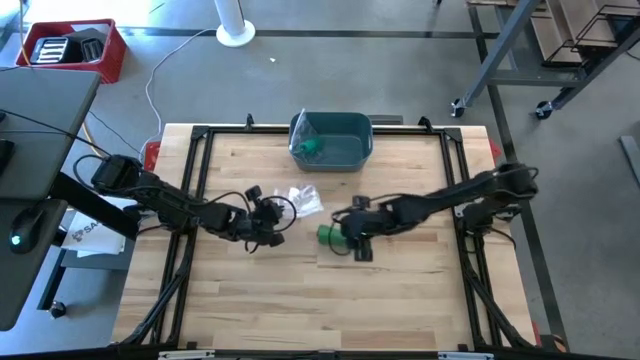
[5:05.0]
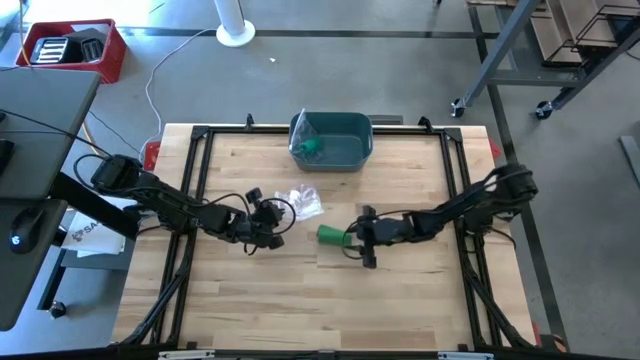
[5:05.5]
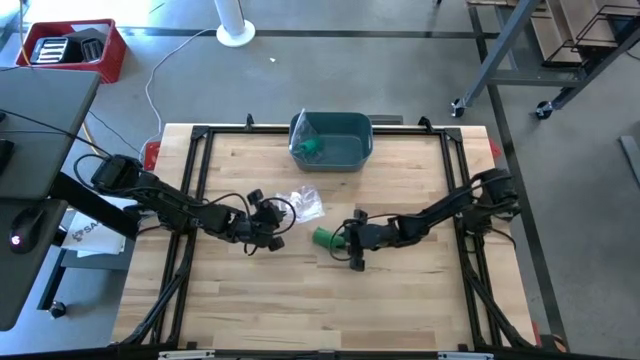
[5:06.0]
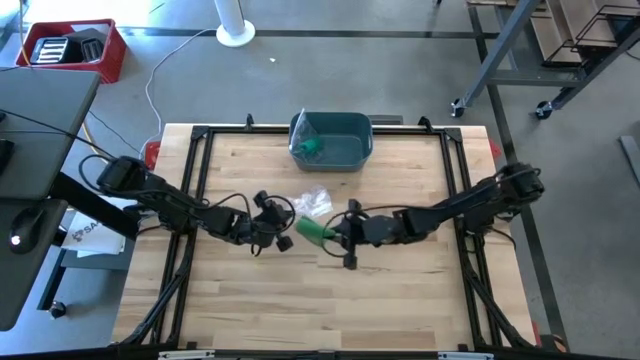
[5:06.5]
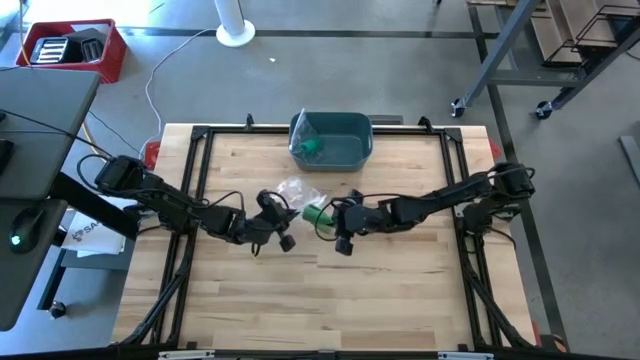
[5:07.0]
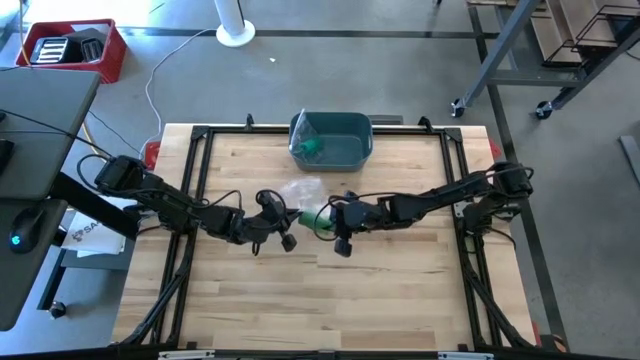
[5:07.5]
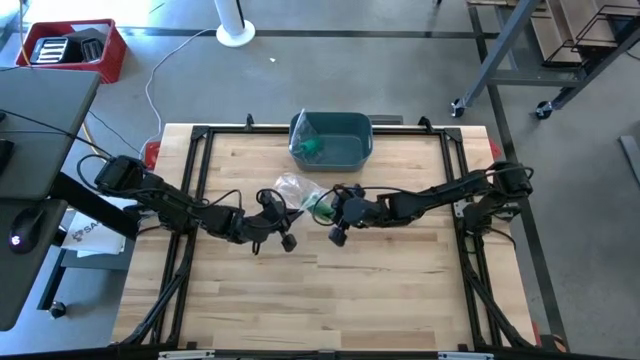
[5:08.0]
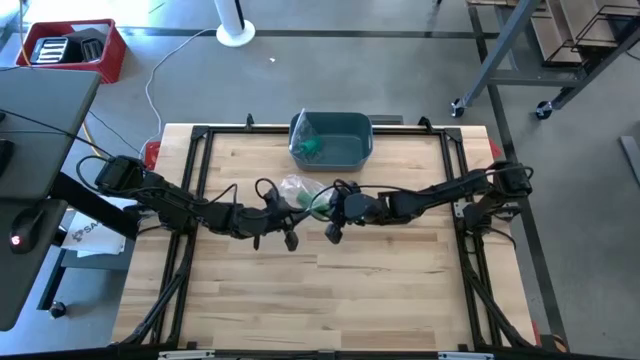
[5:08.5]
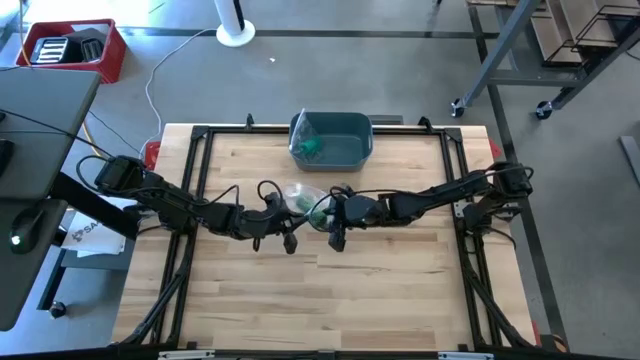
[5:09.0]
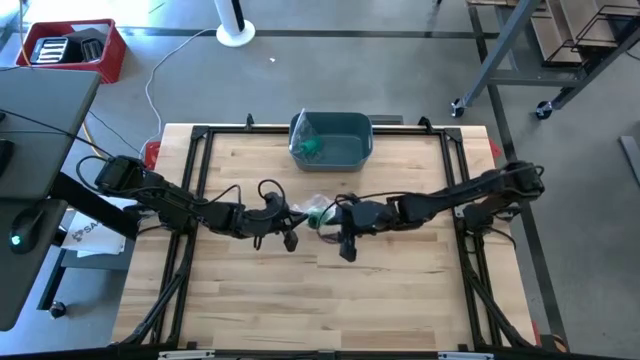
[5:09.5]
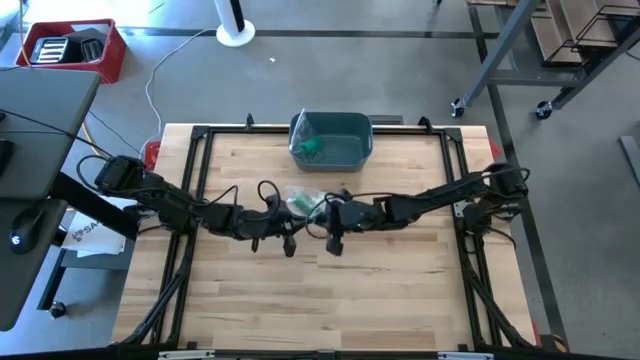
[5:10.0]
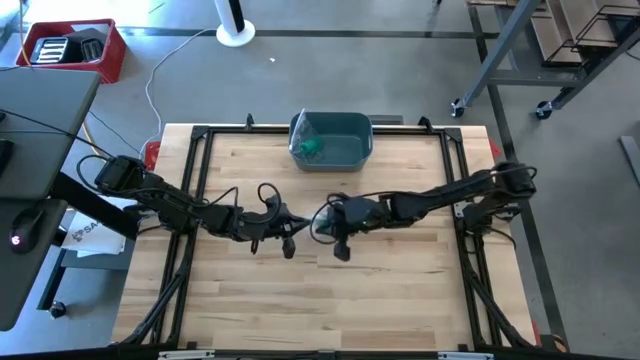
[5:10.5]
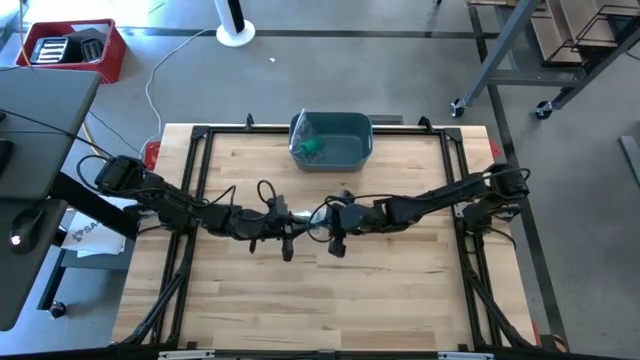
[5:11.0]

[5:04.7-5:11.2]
Task: Roll bandage
Put the green bandage into the transparent zip bag

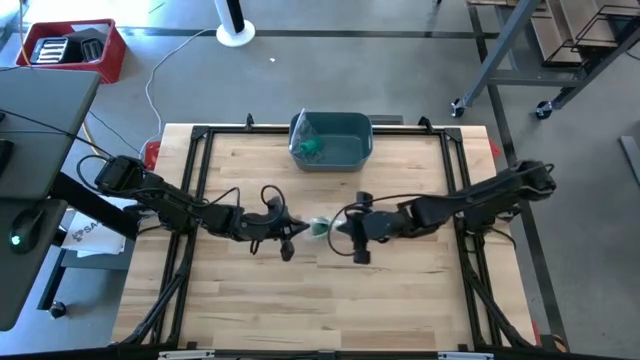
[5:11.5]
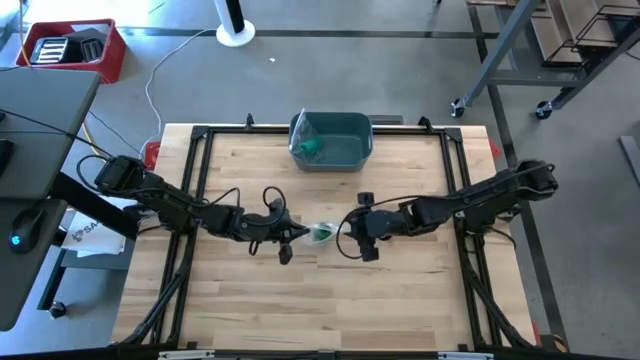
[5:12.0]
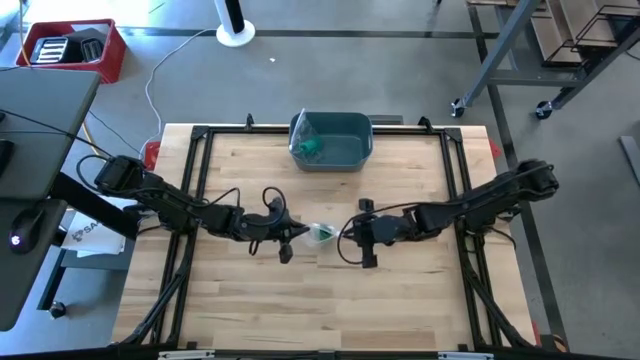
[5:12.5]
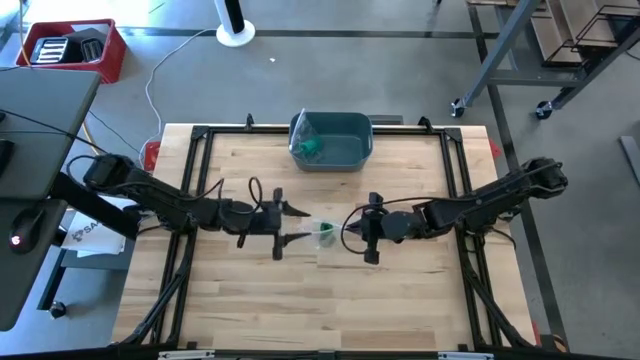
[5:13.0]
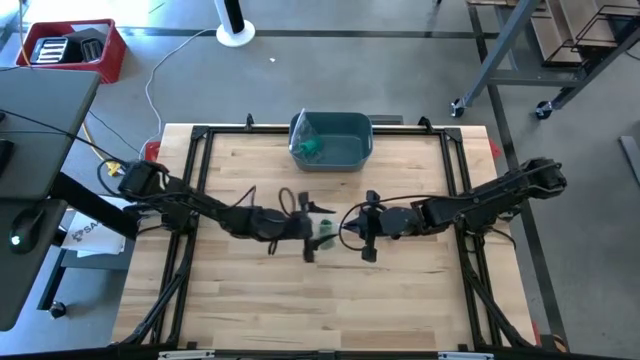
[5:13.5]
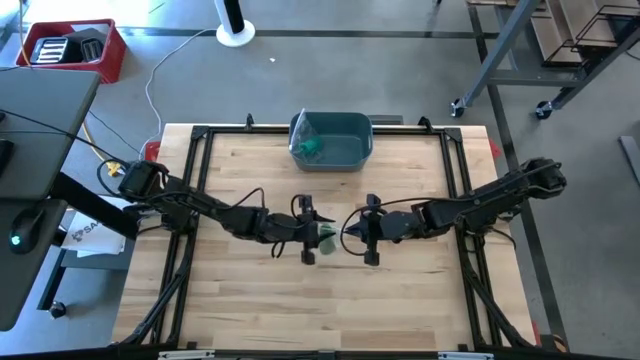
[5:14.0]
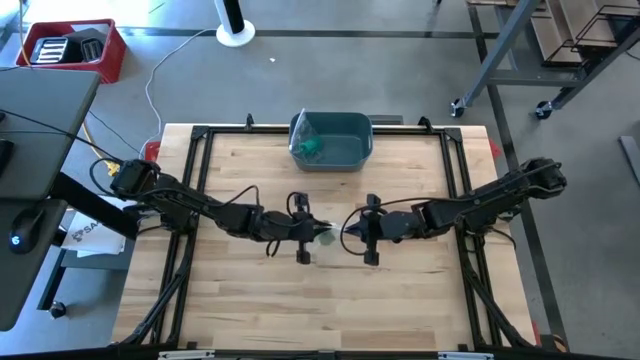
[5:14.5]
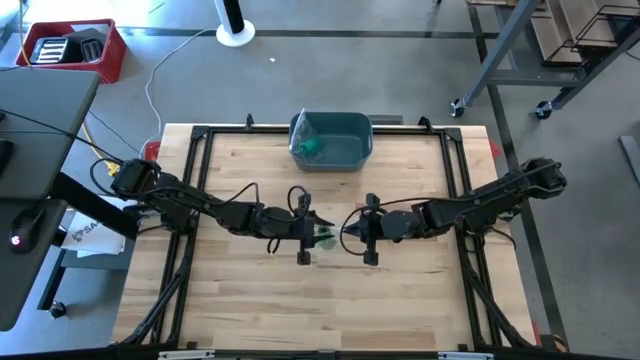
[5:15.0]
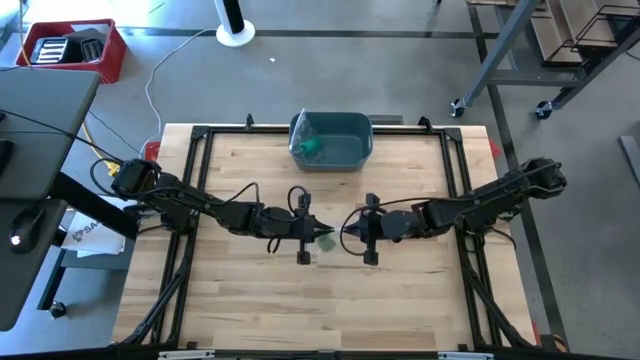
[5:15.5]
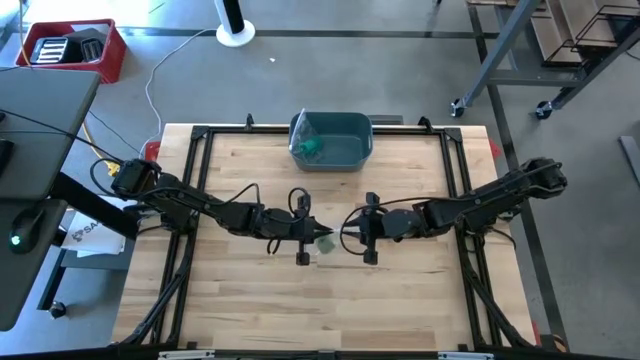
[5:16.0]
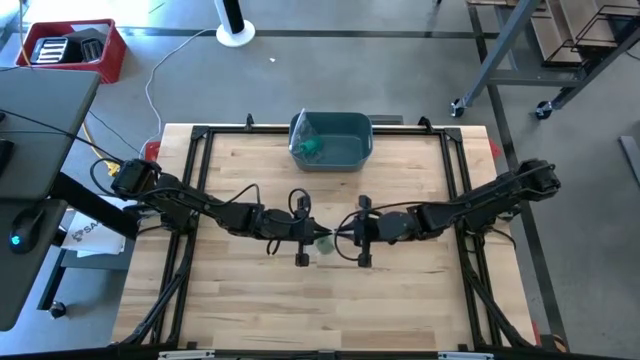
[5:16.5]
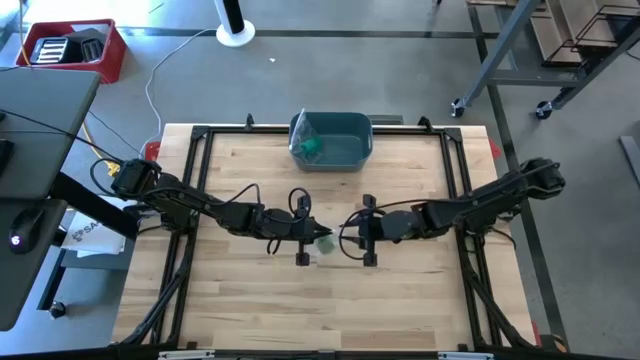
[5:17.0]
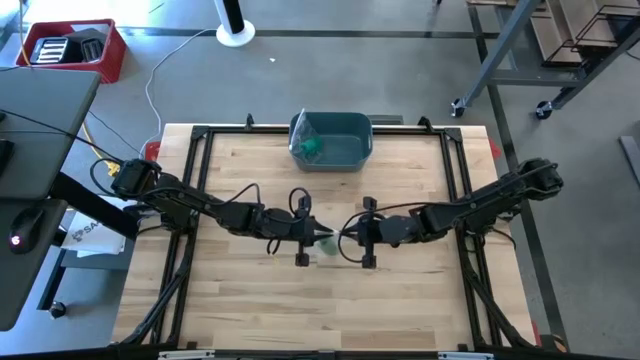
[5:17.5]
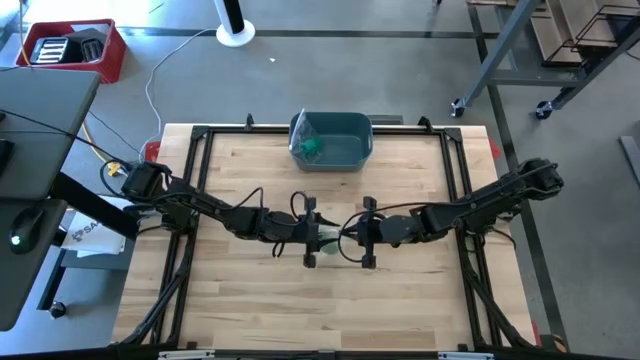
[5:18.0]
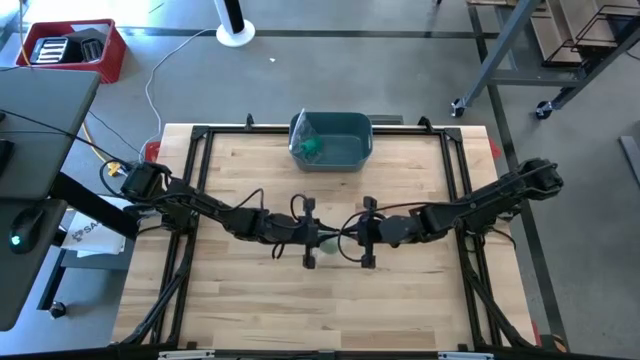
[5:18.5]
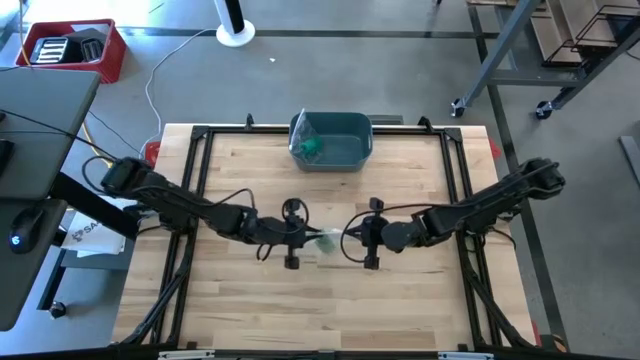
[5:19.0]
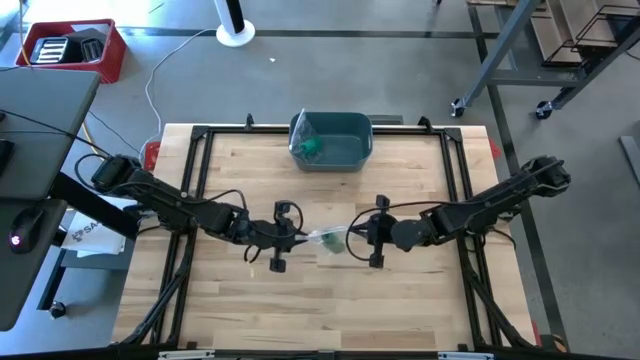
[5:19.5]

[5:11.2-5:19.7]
Close the transparent zip bag

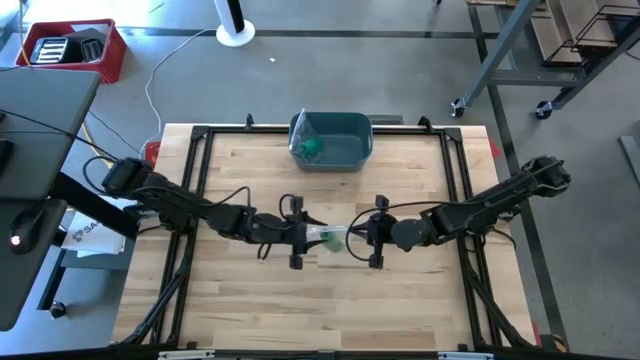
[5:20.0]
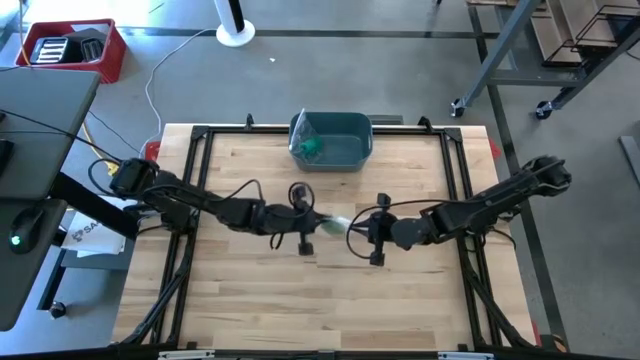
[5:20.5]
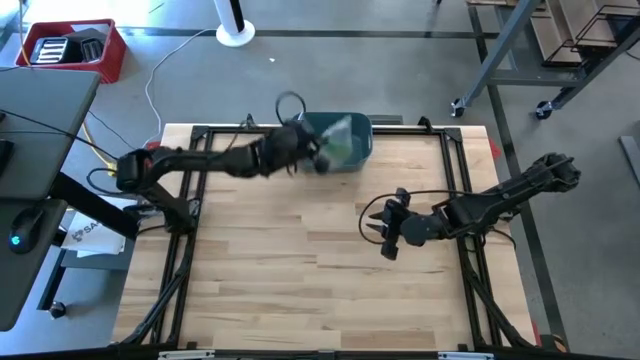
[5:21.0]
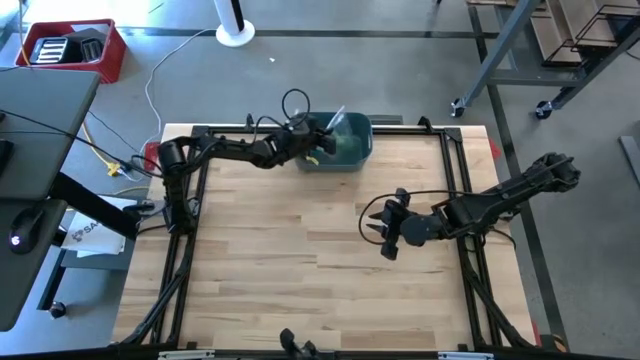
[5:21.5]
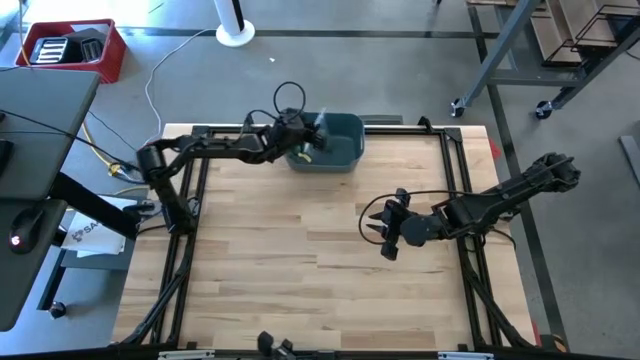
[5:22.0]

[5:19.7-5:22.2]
Put the transparent zip bag with the green bandage into the blue bin

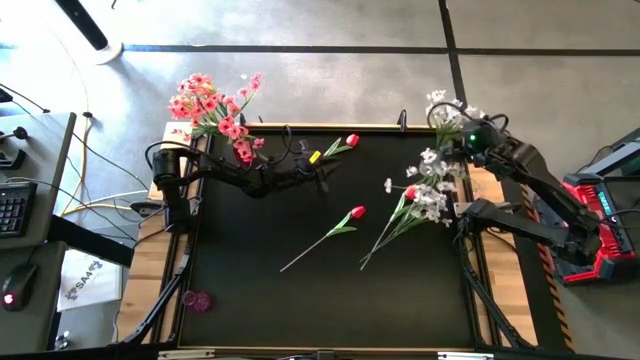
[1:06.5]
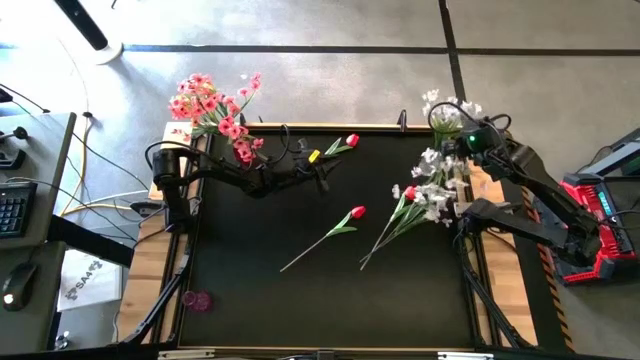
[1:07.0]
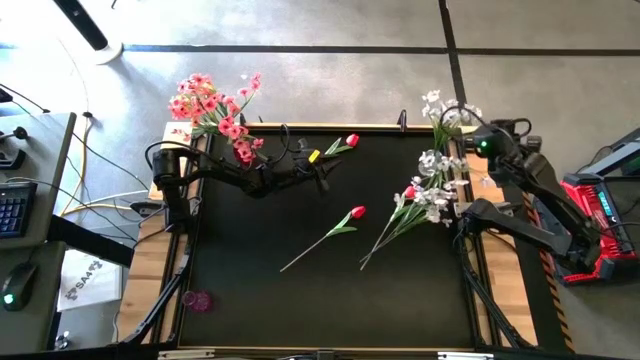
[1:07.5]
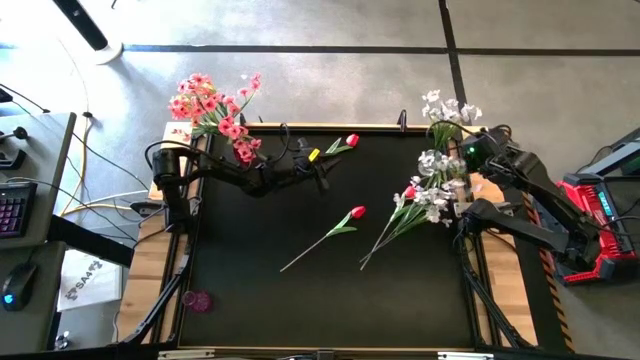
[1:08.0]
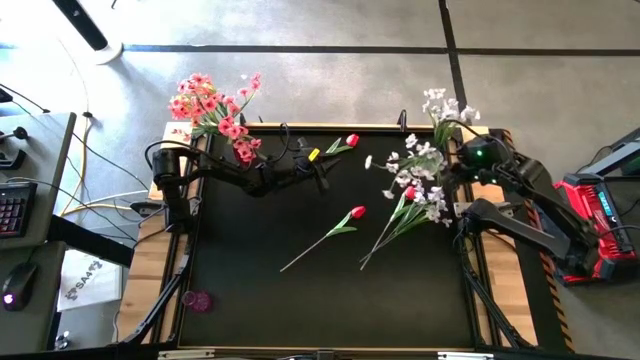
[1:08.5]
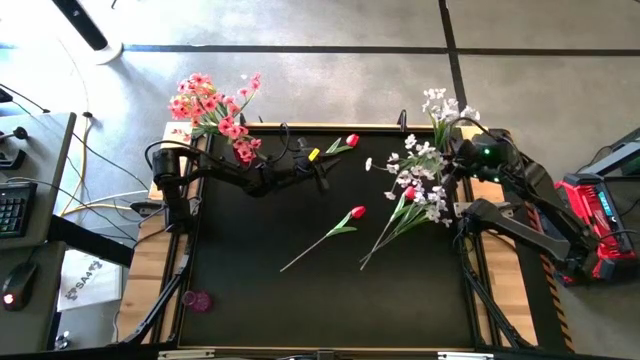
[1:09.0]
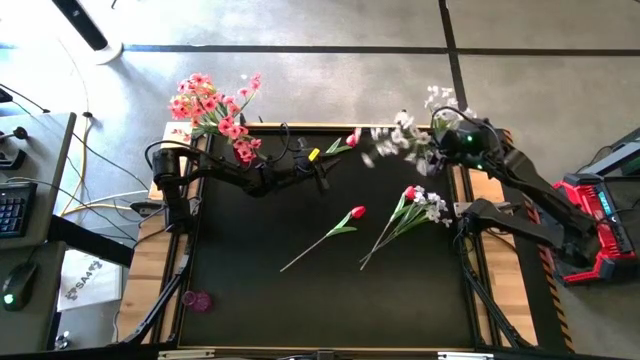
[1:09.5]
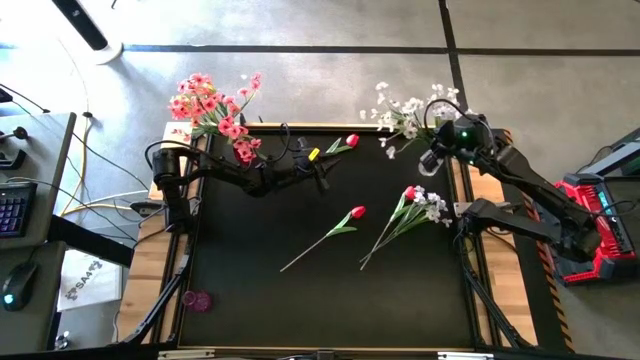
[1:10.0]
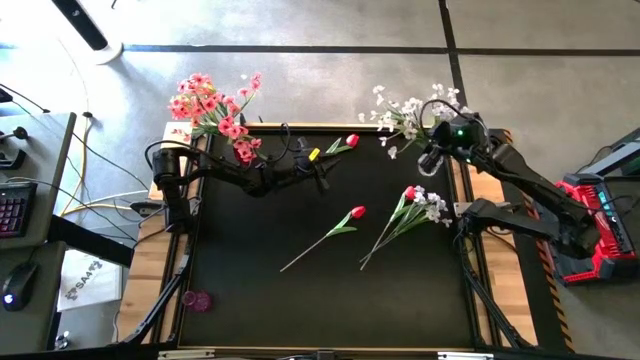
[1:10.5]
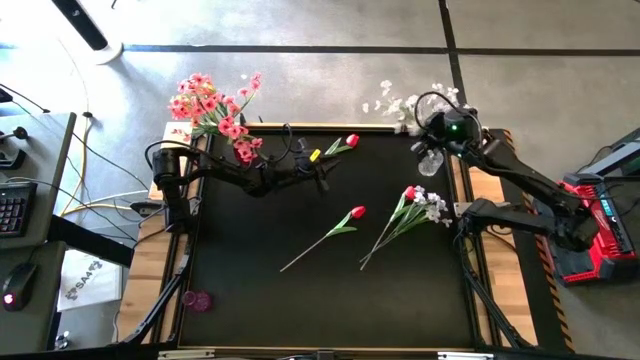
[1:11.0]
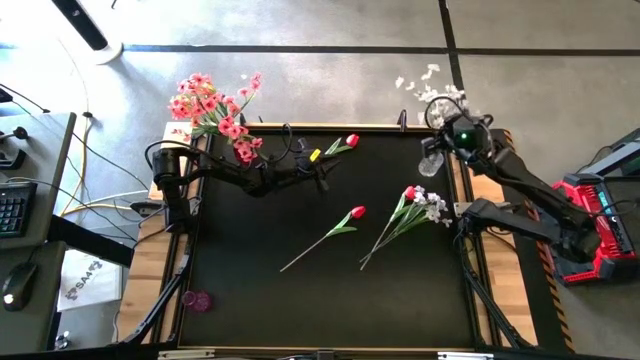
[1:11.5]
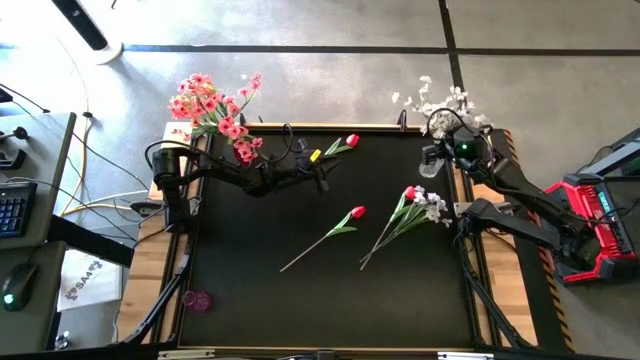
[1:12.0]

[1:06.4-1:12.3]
Task: Sort flowers into vase by color
Adjust the white flowers
